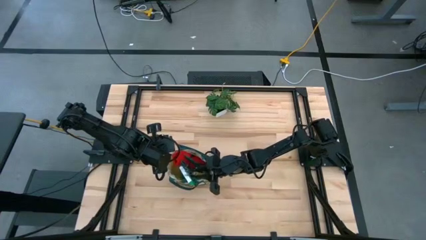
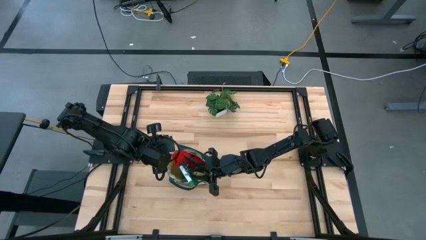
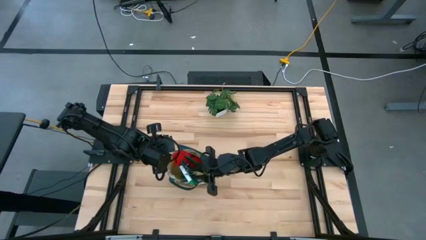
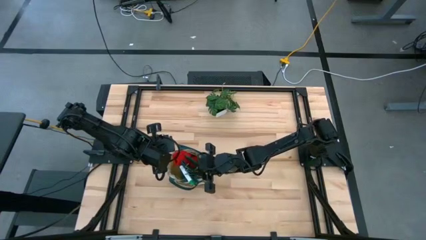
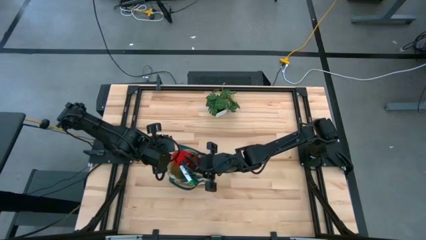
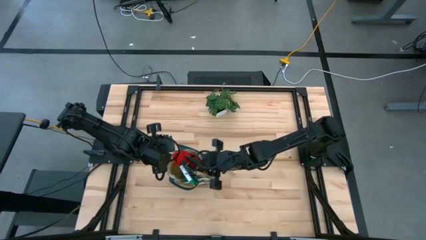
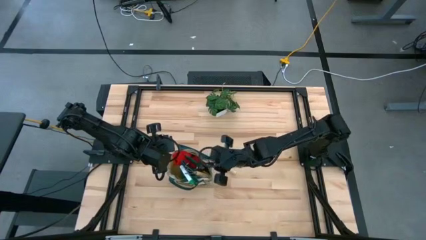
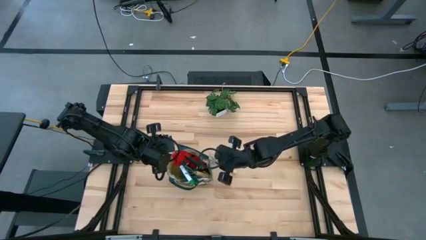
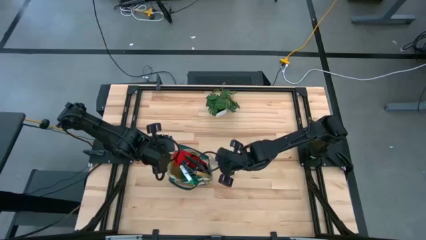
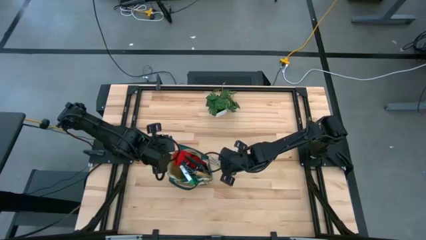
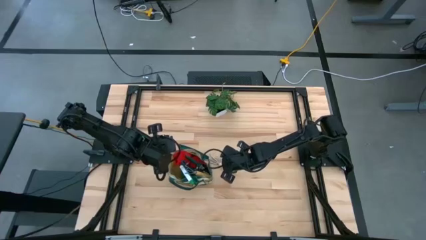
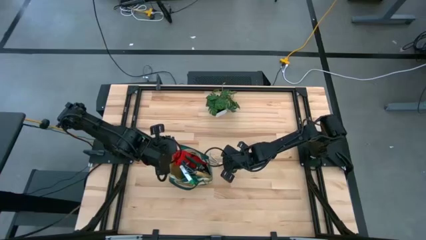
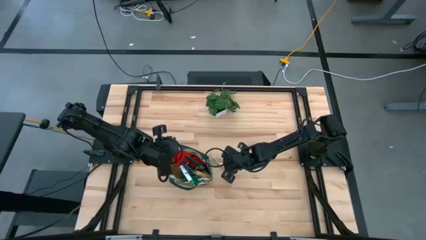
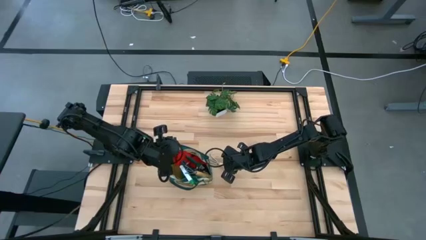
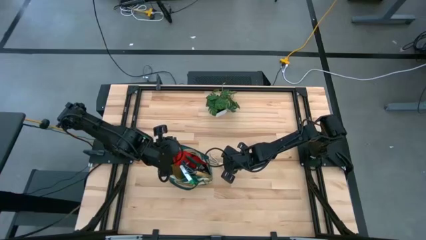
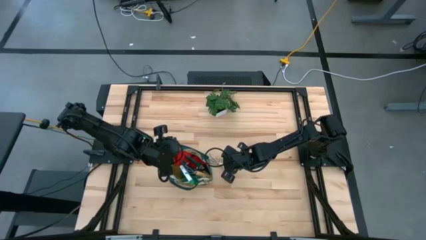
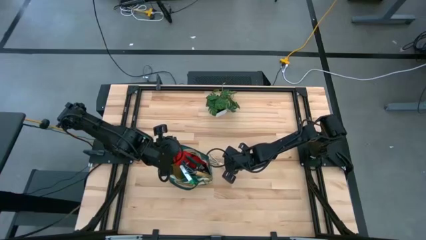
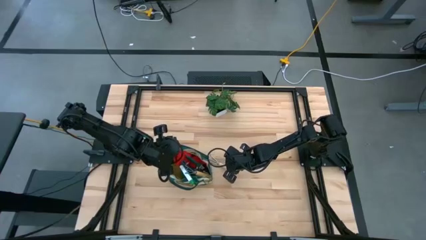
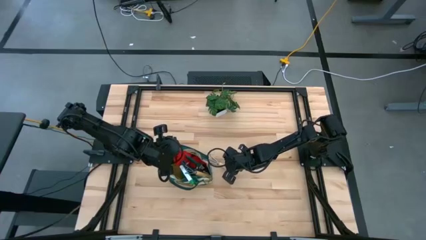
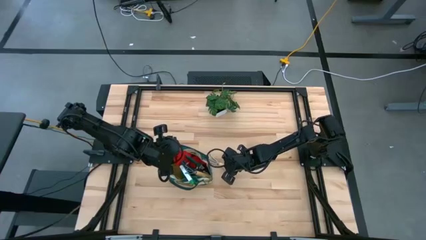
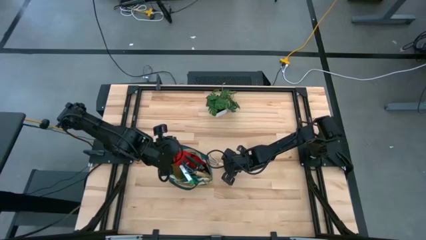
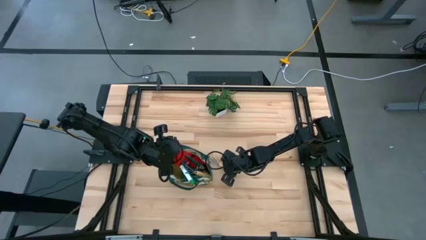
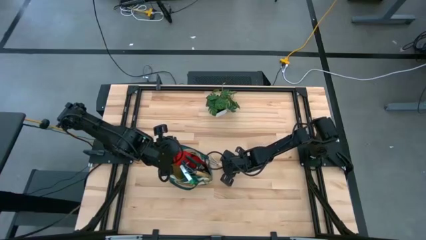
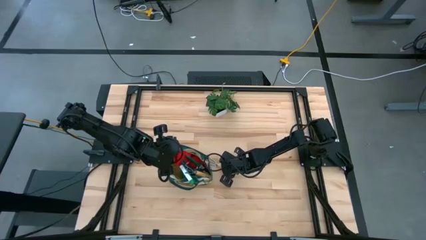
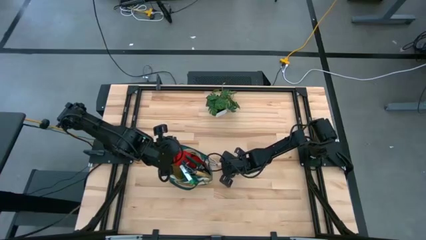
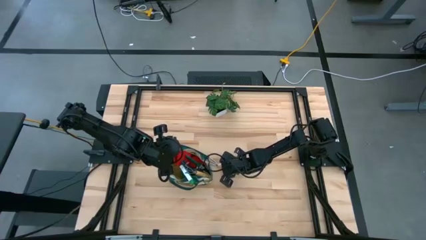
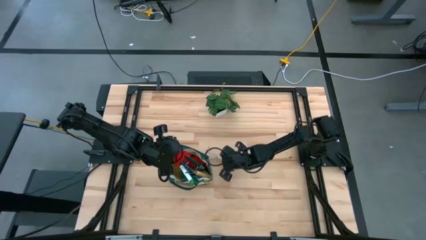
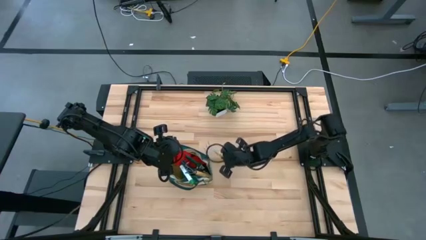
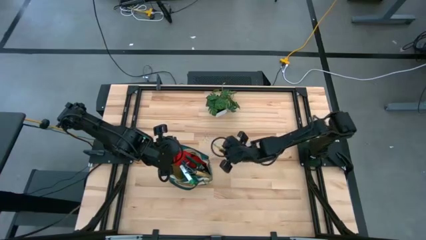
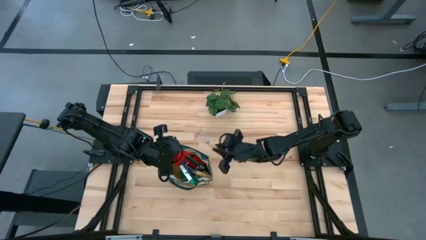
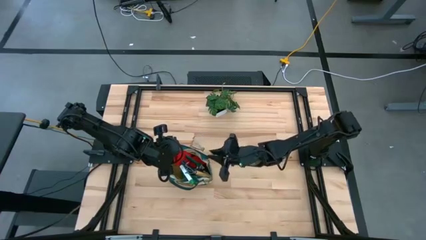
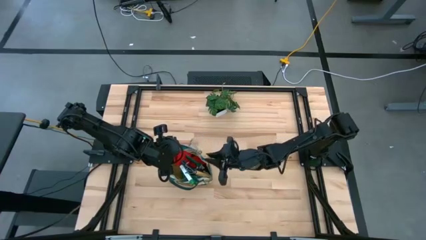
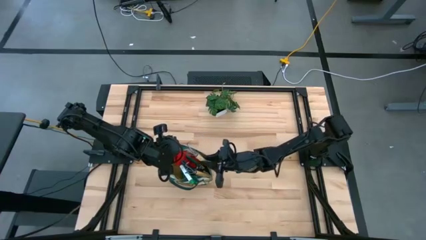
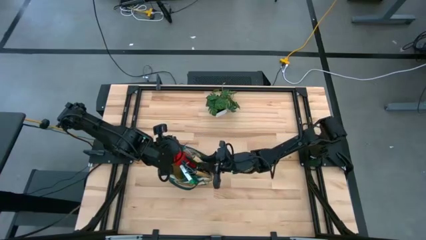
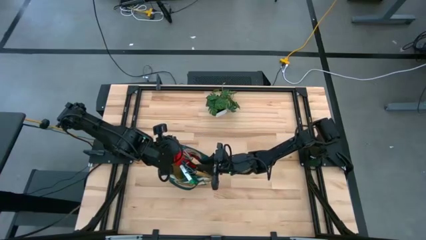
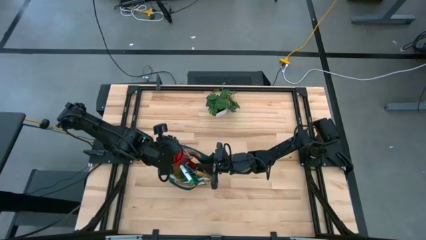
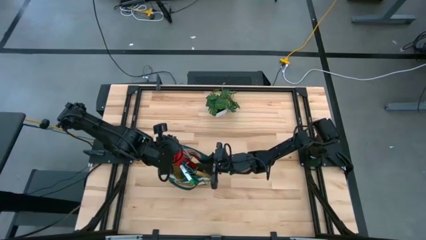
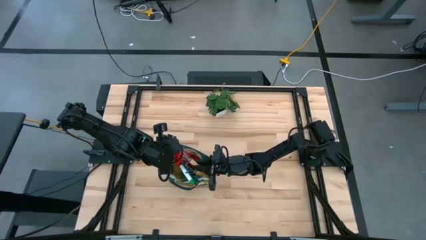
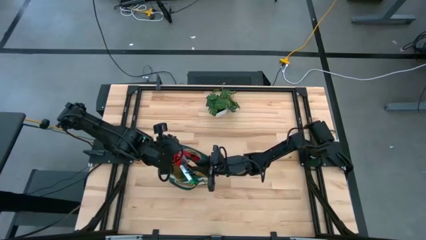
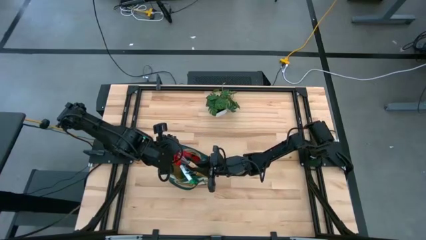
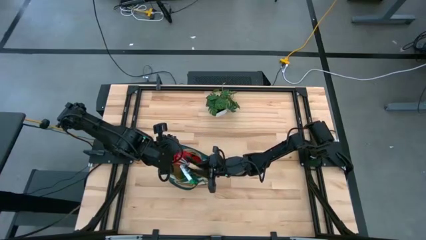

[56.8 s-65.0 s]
Task: Pick & Place Garden tools in Gardening bag
Put the brown hand rake into the green gardening bag

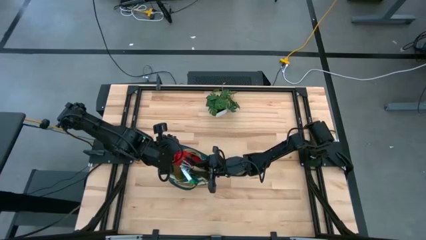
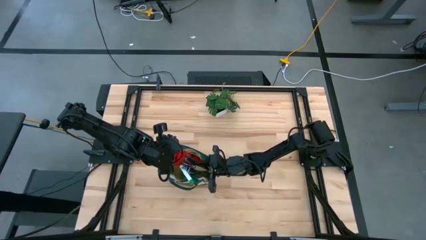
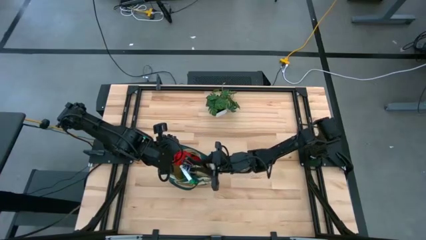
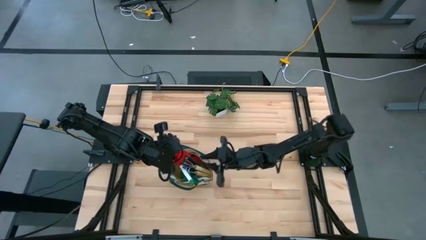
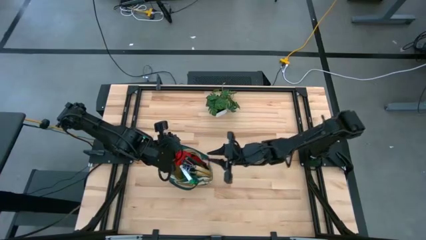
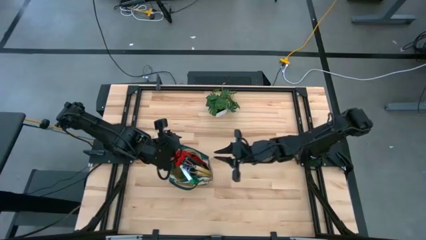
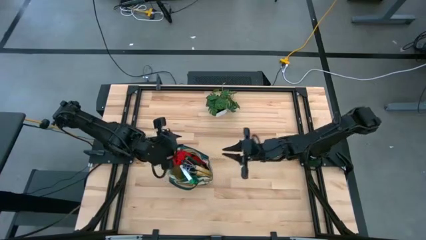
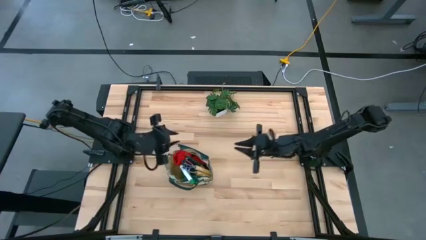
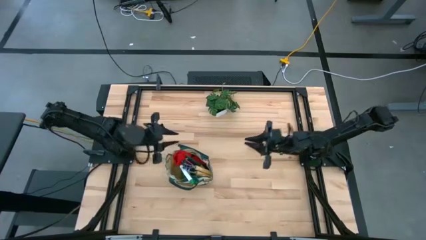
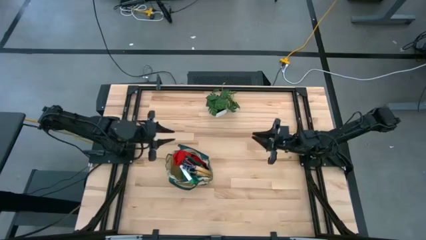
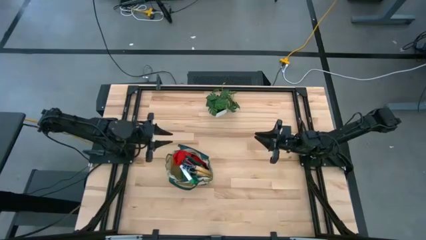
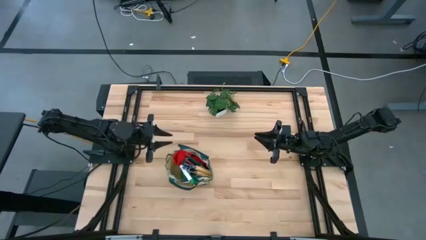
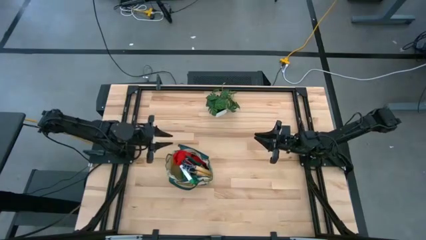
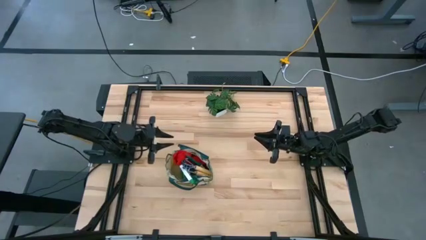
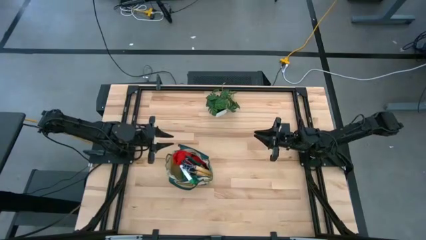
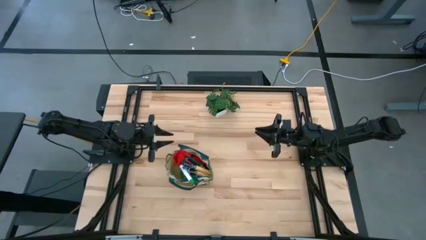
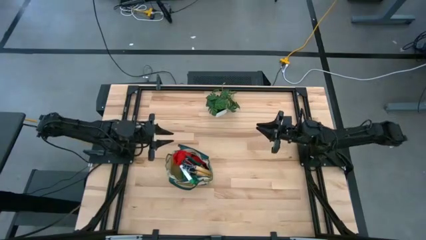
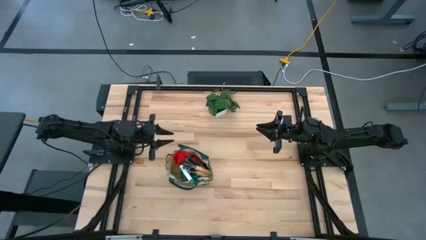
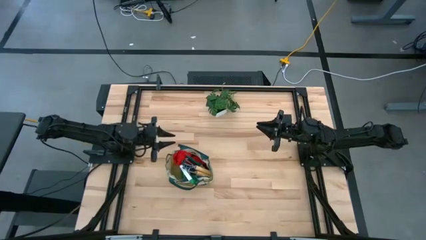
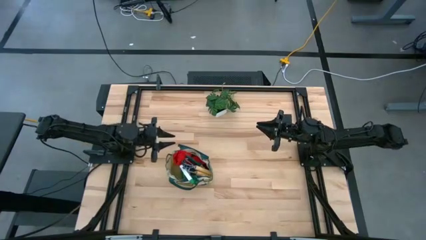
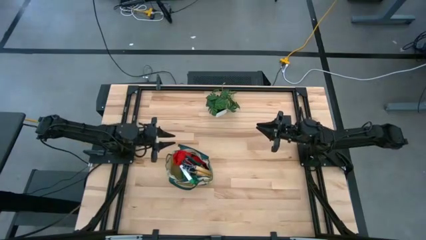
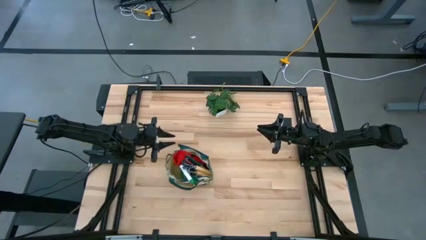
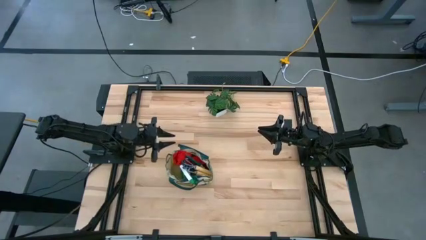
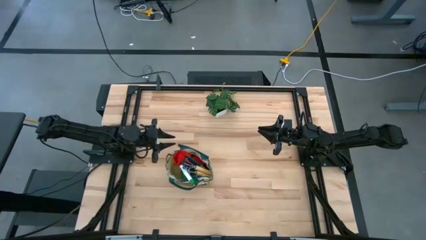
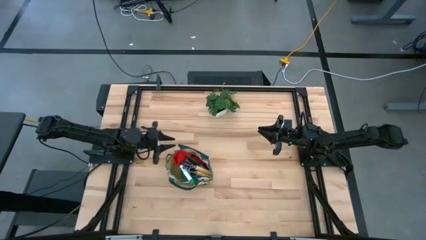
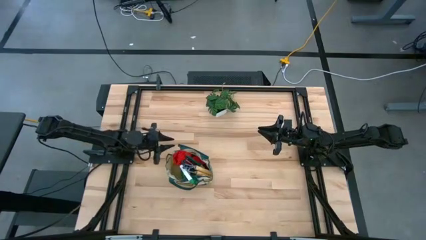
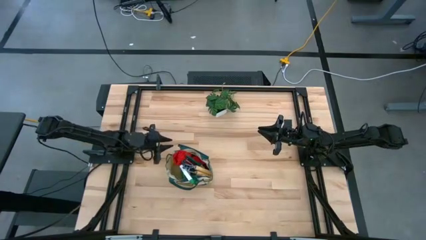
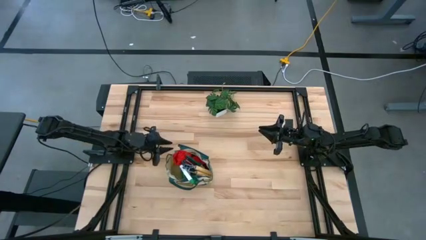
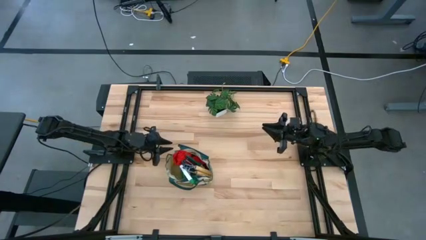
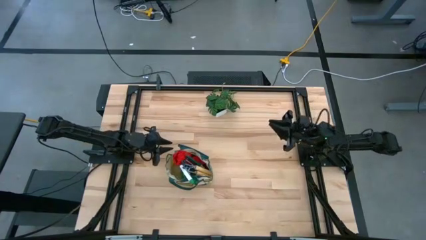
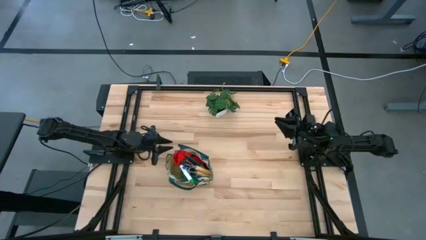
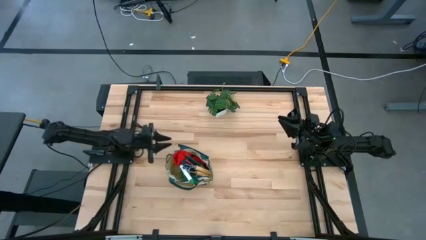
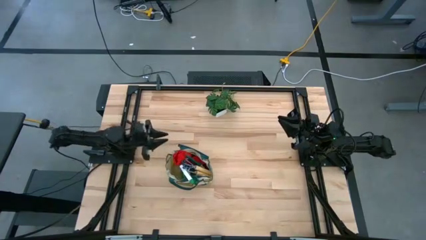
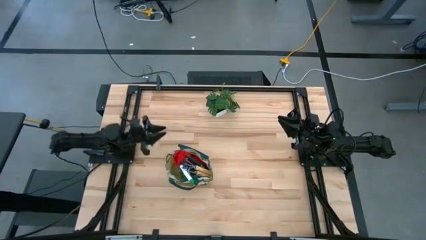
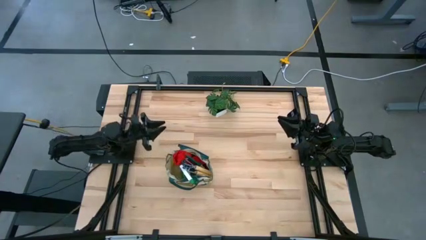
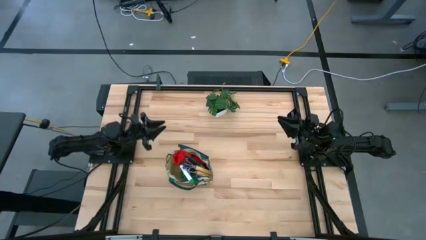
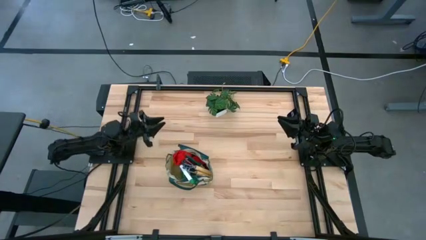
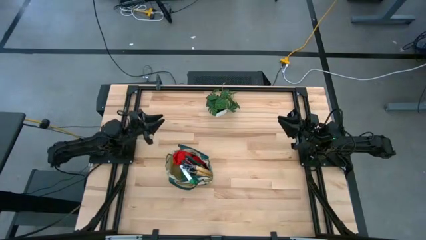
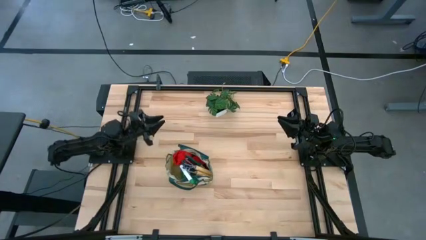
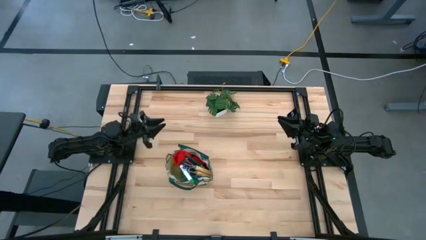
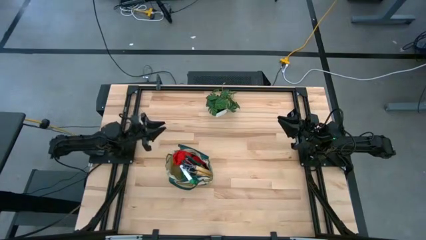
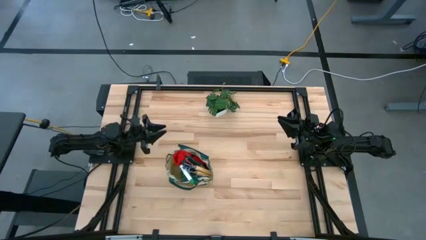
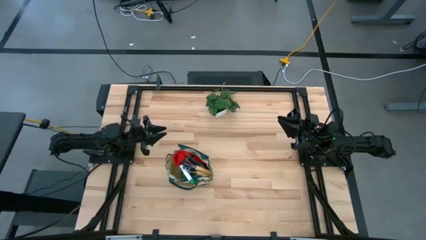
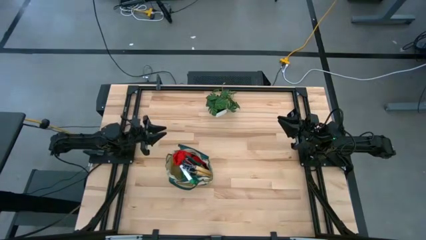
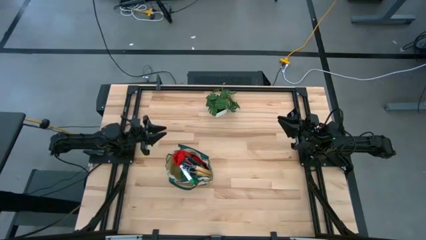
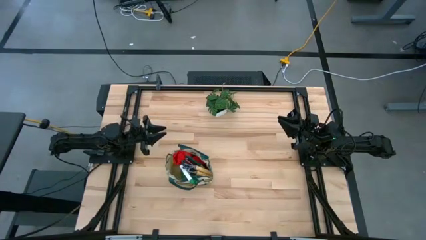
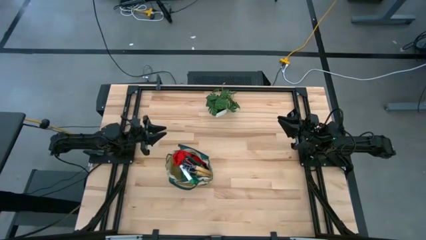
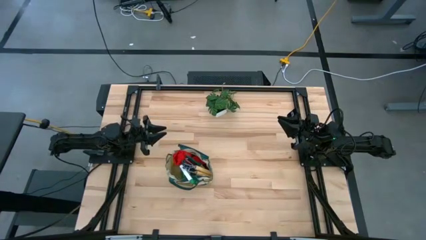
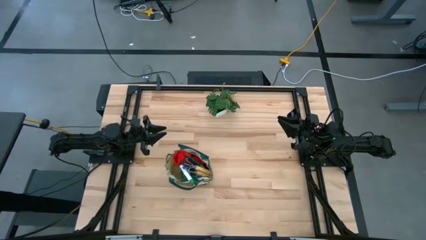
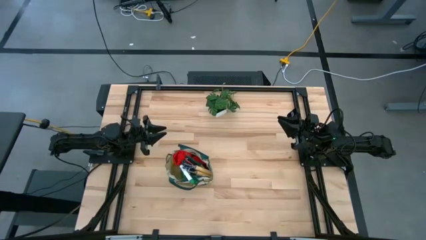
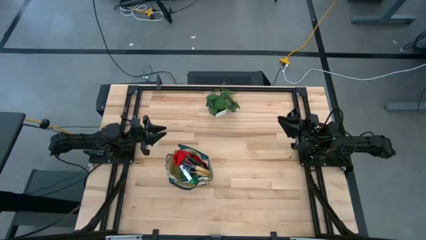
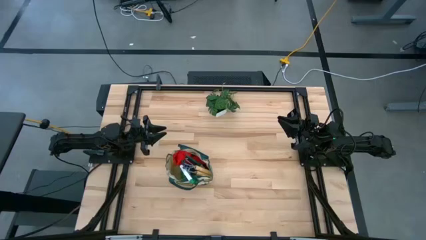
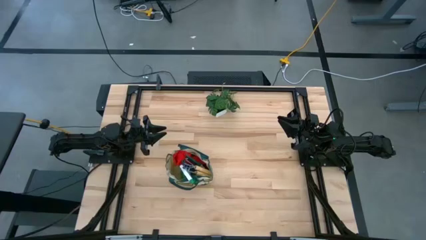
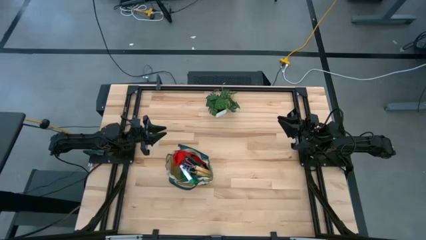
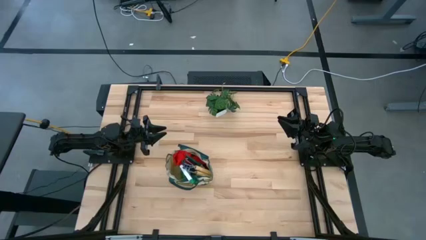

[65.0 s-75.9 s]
Return to Home Position
